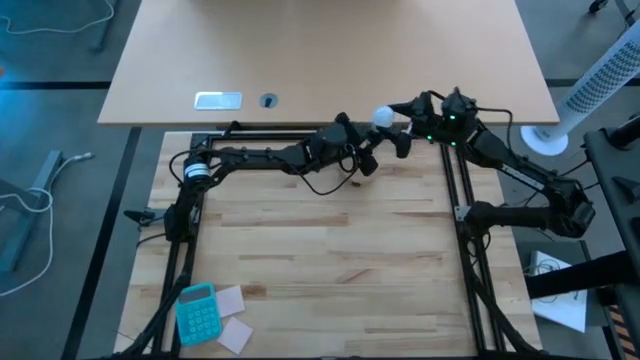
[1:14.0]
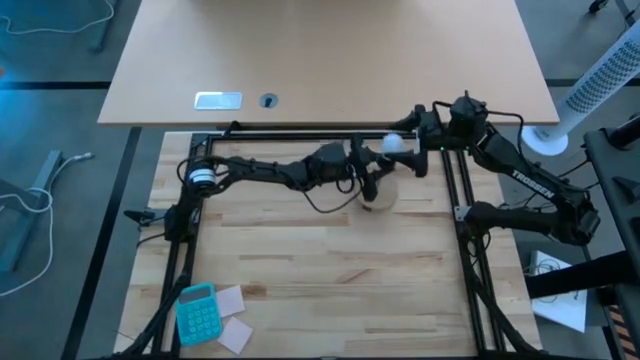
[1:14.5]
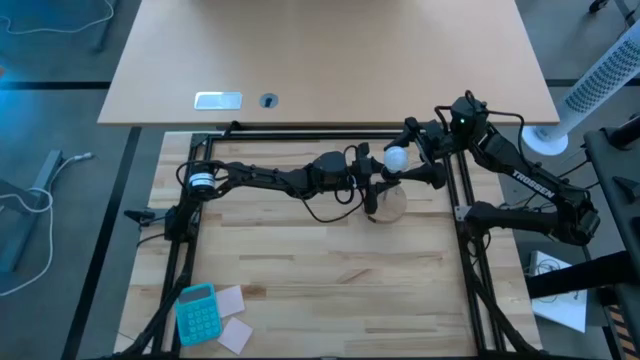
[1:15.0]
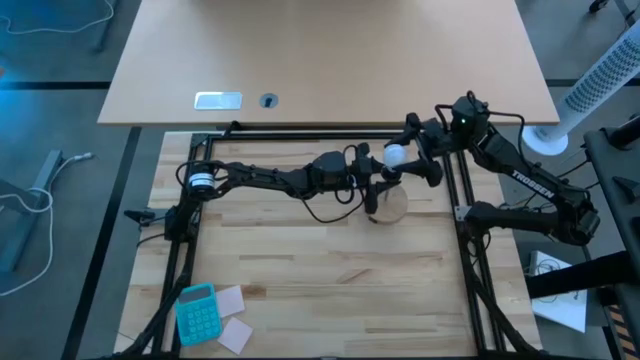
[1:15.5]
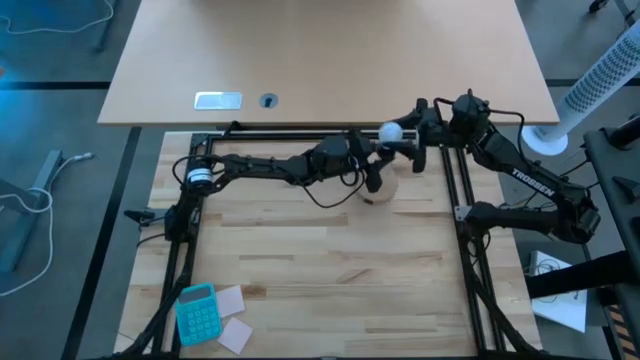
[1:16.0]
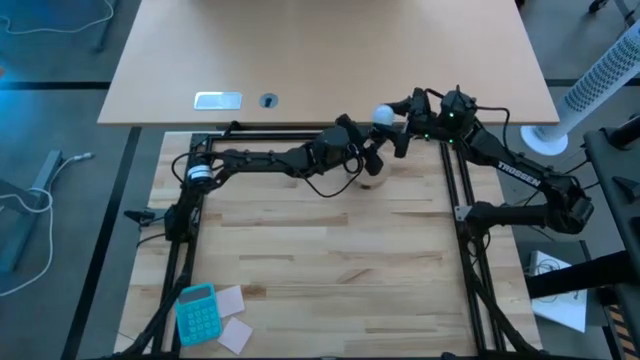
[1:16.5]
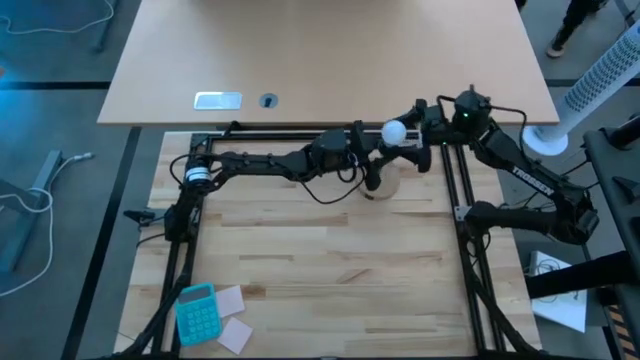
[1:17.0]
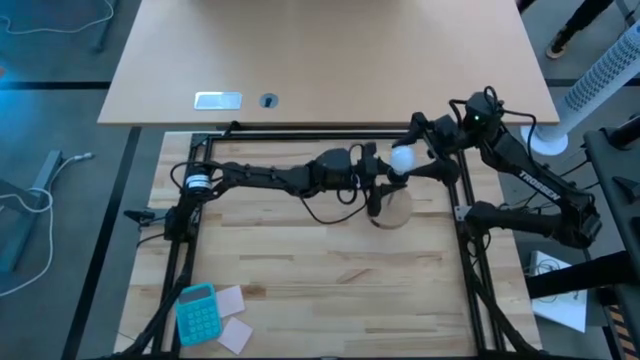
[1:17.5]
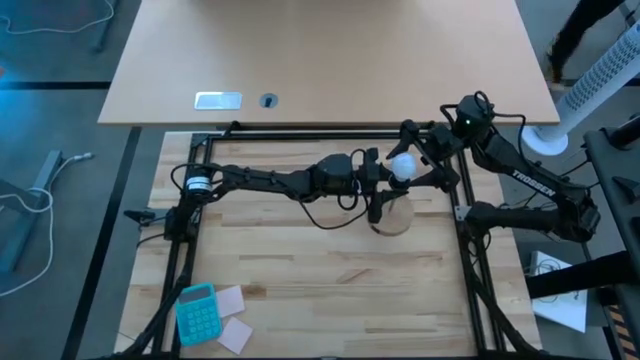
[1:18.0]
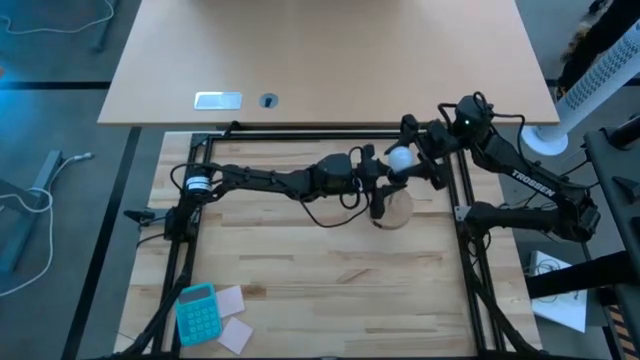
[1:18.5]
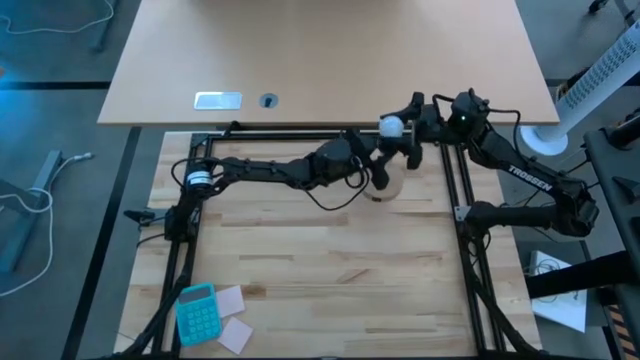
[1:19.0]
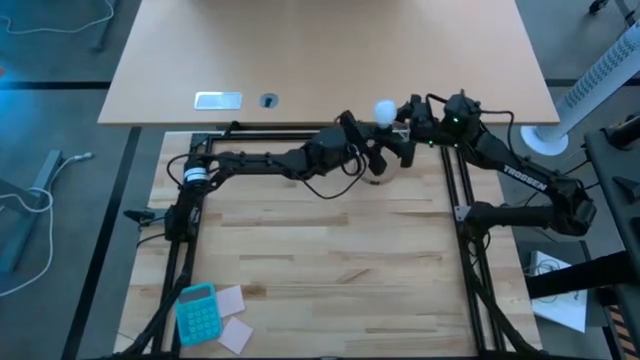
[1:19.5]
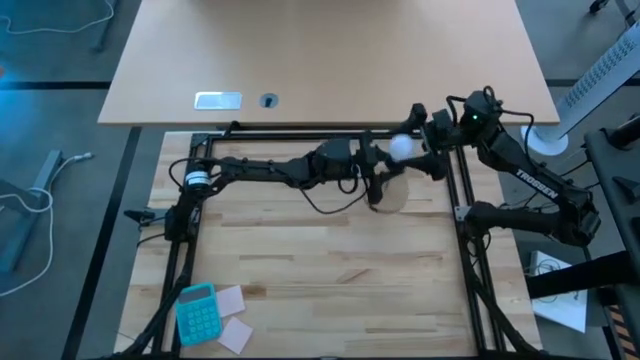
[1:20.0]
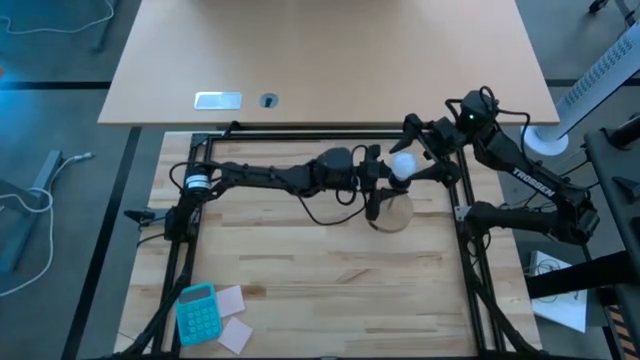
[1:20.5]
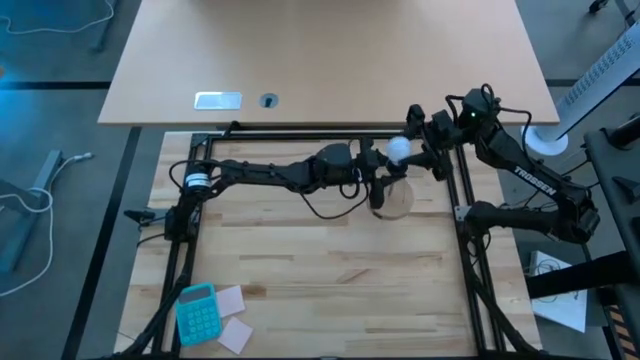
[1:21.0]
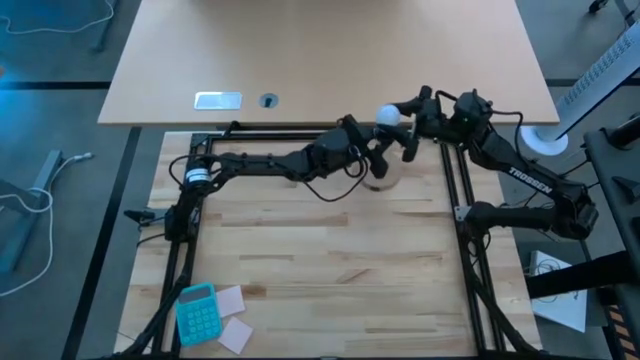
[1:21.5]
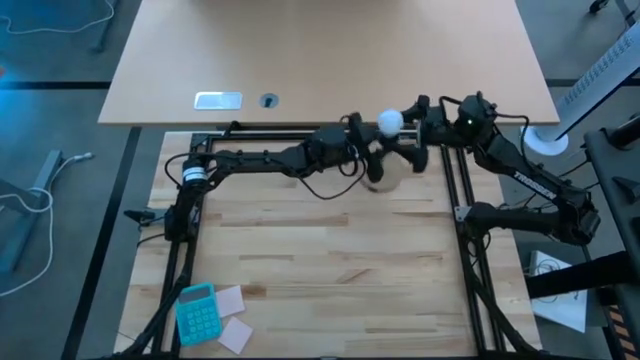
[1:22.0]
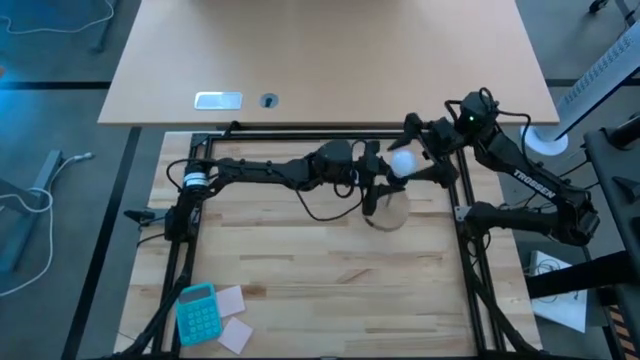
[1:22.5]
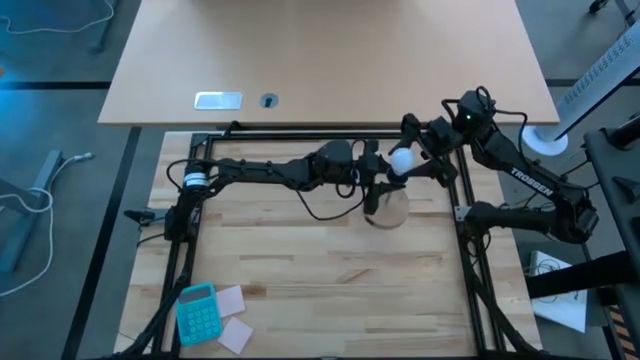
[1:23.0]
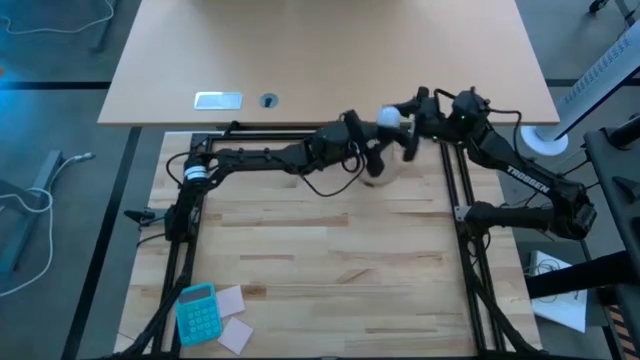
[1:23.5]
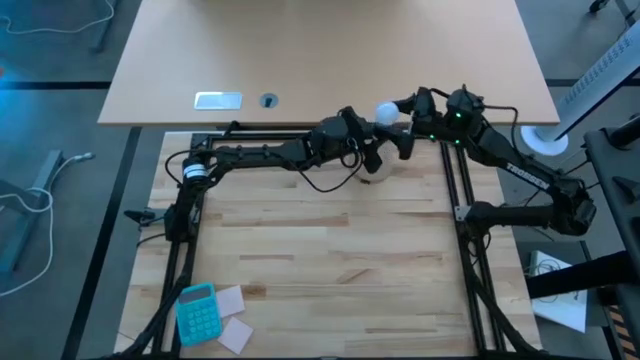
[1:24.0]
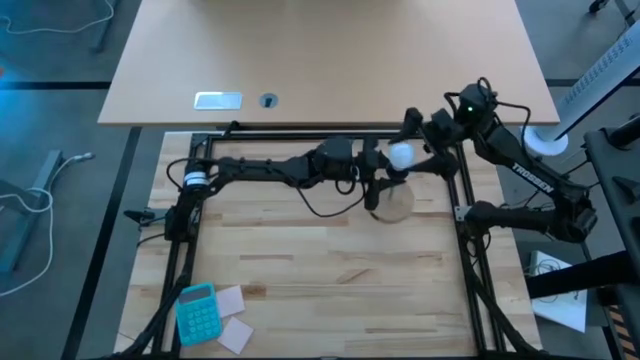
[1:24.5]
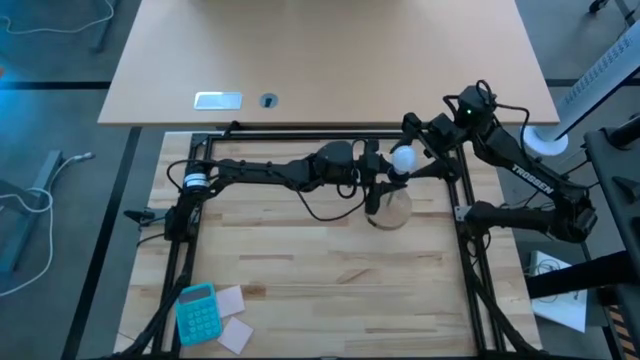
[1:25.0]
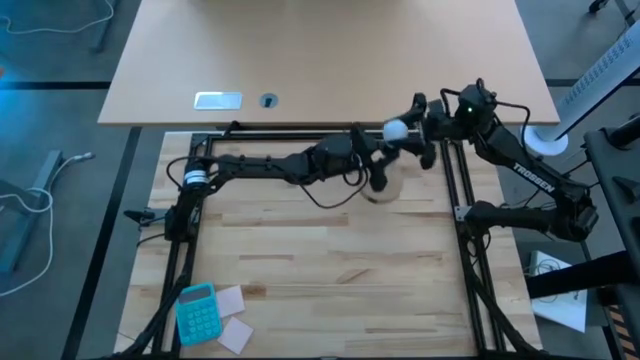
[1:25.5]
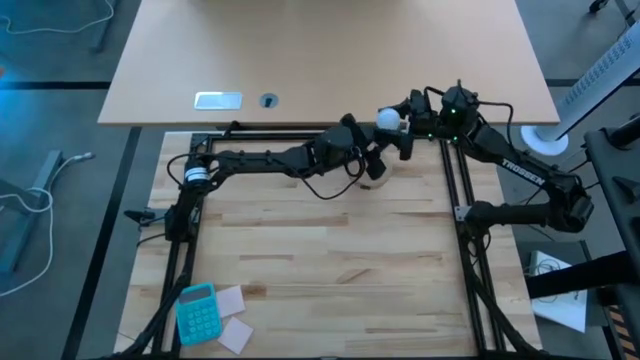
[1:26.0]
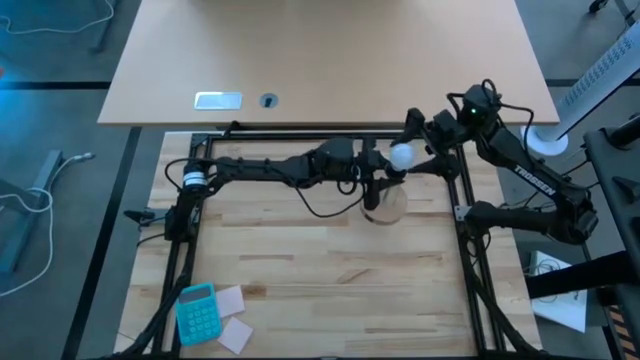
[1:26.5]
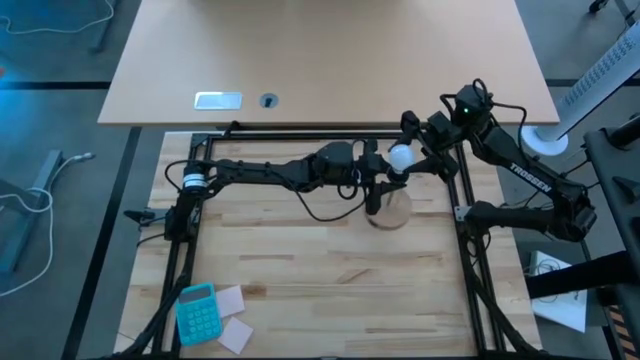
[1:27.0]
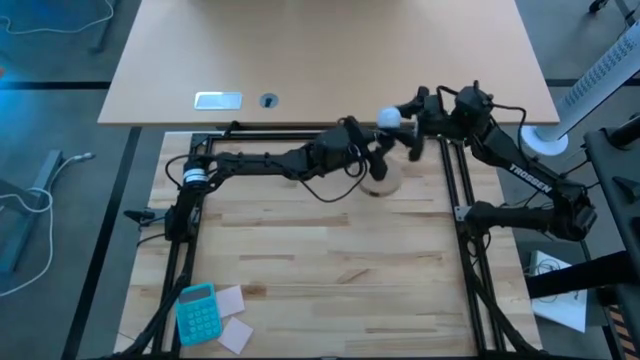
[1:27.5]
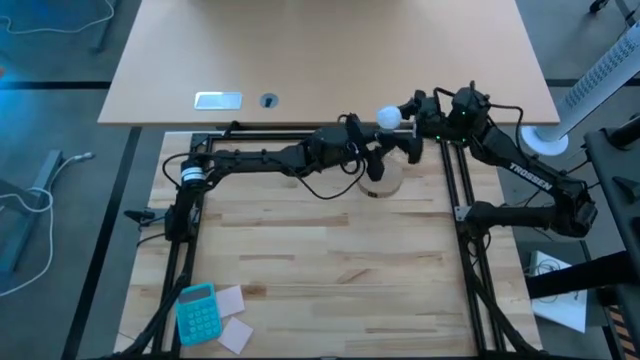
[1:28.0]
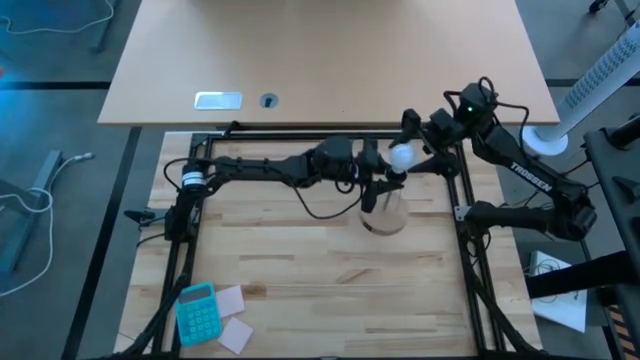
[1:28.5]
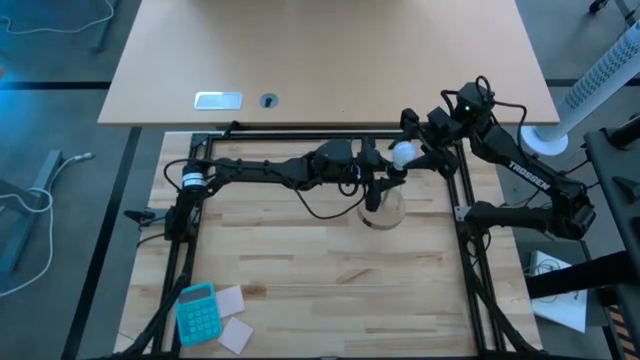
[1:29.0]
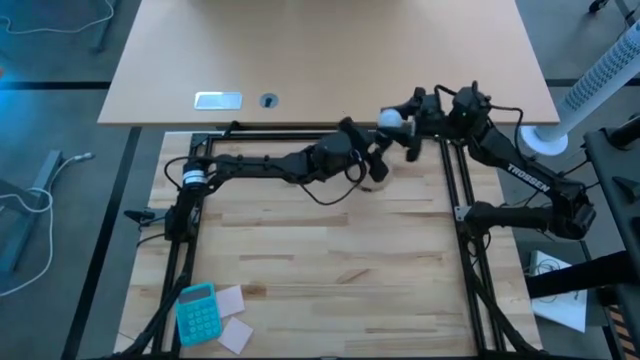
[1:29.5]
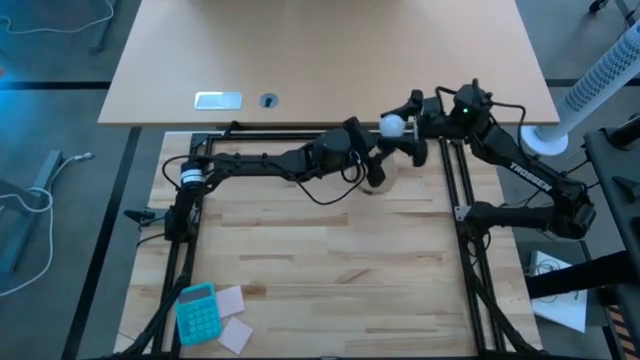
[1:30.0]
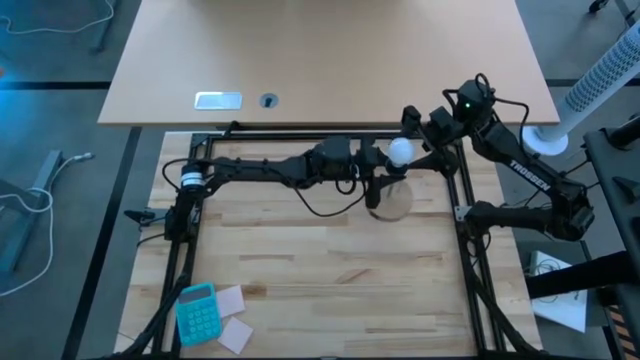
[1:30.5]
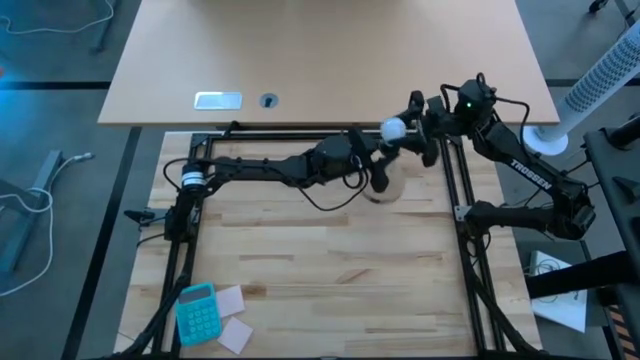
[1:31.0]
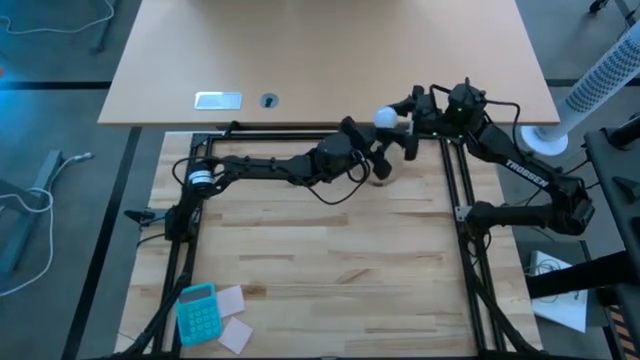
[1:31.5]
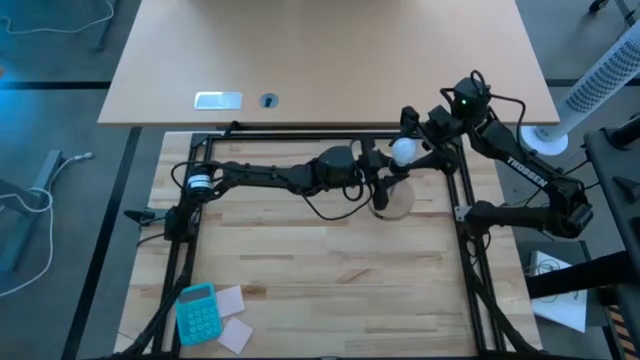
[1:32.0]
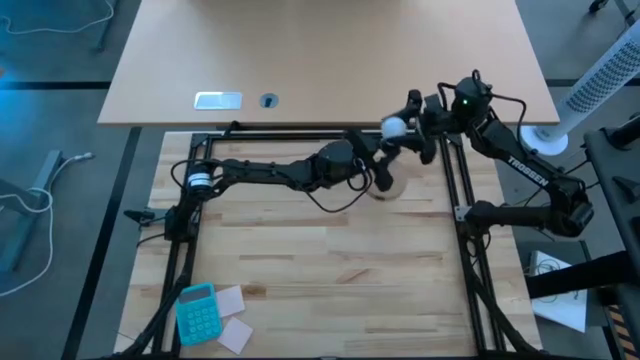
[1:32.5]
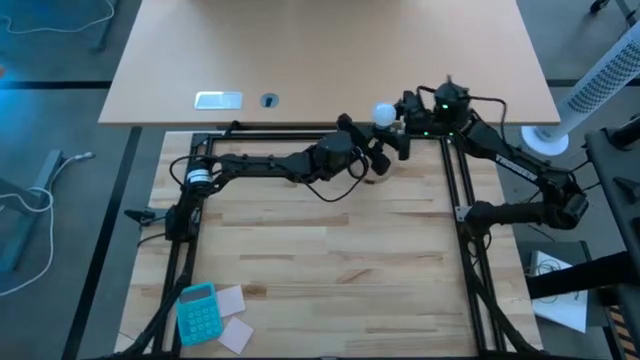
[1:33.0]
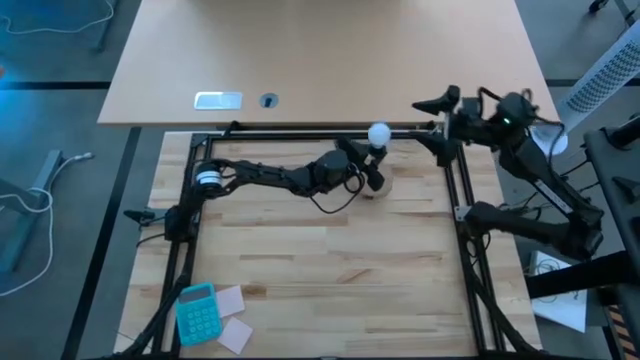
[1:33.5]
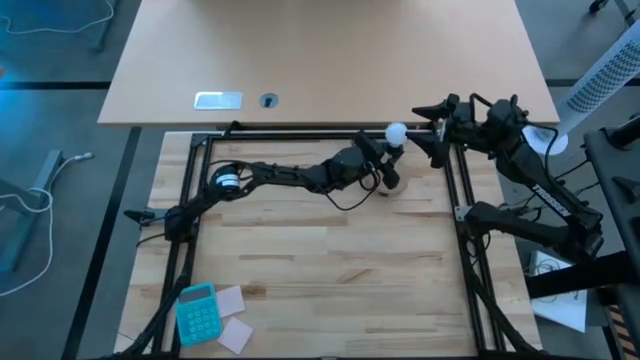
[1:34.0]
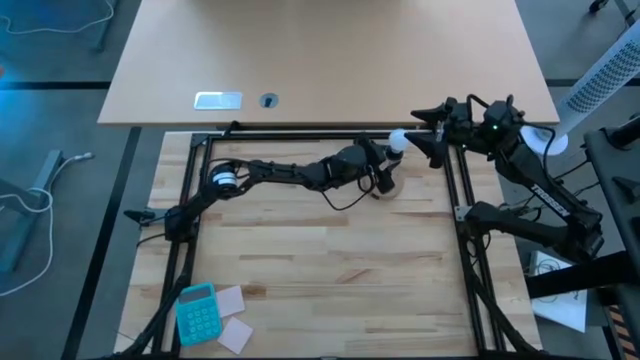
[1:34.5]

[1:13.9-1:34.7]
Task: Screw lightbulb
Insert the lightbulb into the lamp
